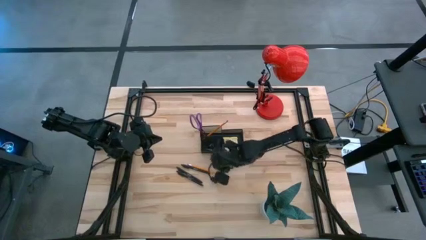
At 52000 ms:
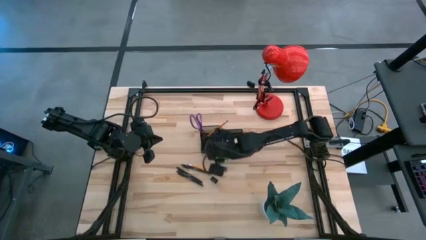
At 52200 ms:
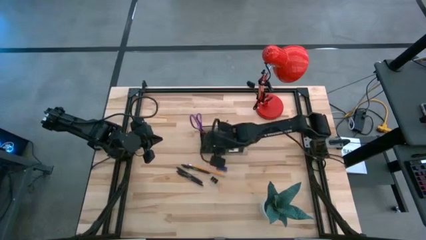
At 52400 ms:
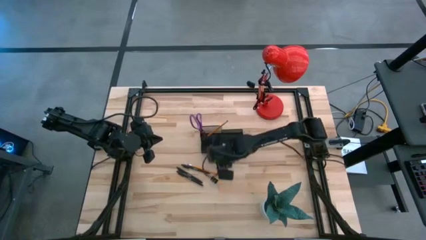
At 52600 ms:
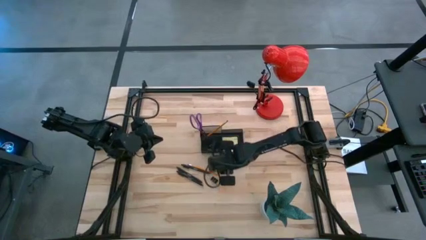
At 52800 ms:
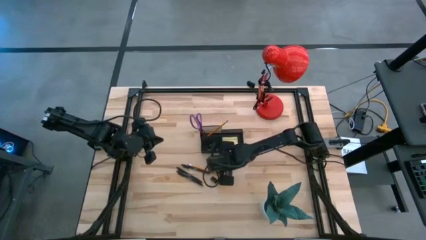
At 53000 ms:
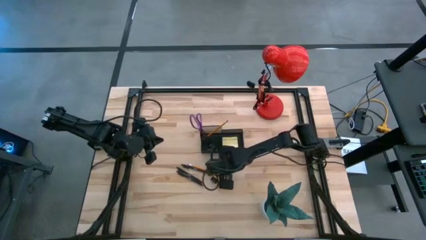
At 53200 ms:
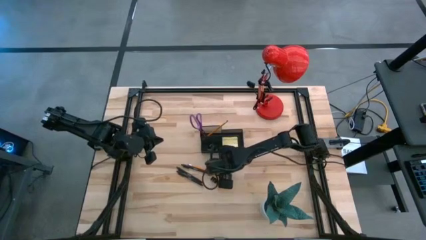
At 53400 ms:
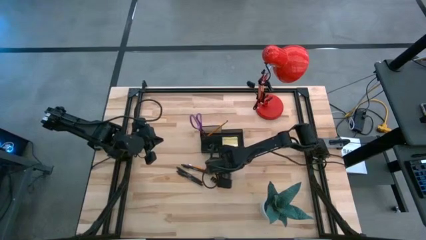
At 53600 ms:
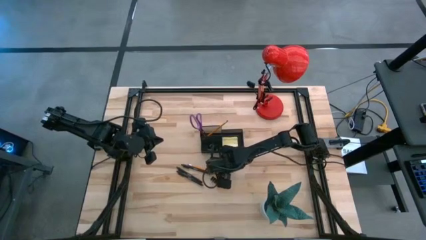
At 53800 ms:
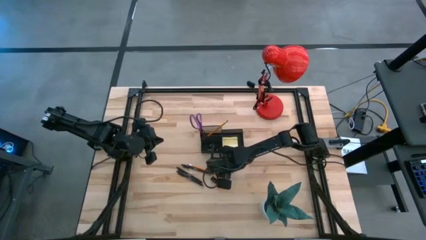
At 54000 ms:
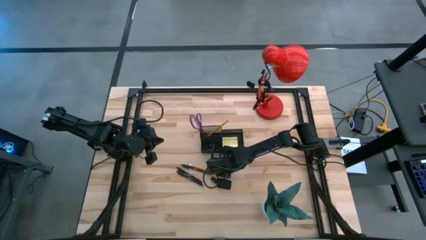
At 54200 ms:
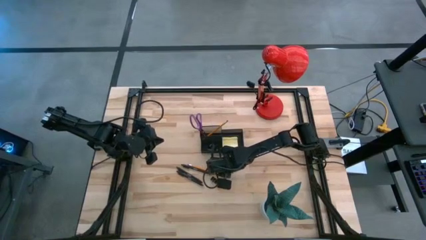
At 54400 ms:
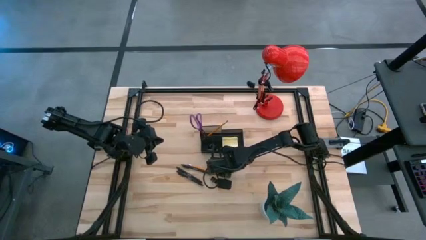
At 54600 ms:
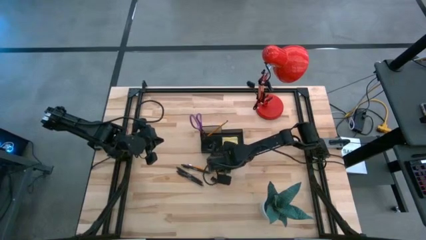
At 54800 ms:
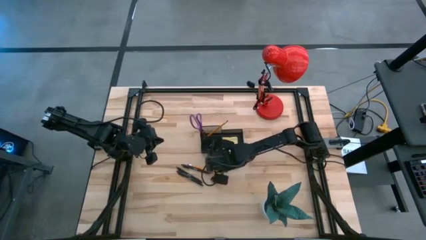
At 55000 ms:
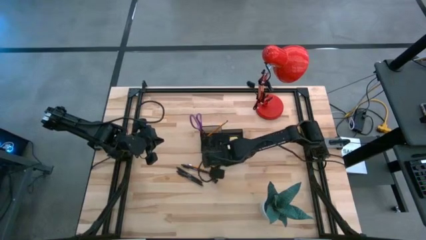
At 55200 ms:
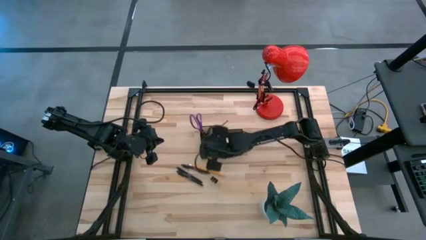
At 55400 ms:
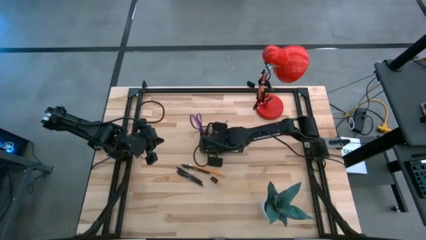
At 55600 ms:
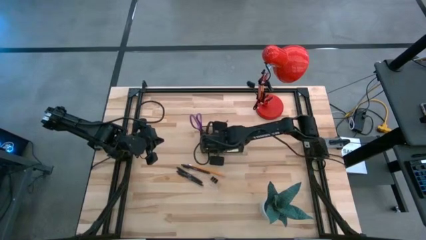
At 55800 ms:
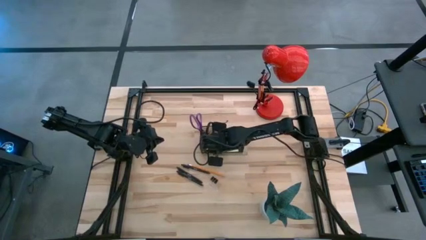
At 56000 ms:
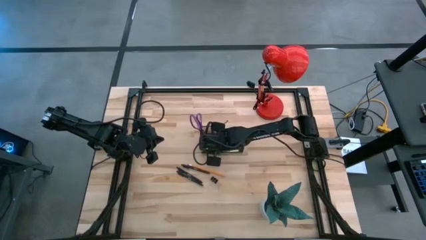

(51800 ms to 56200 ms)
Task: Pick and place office supplies into organizer
Put the blue eraser into the black desk organizer

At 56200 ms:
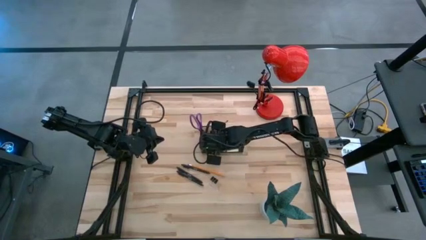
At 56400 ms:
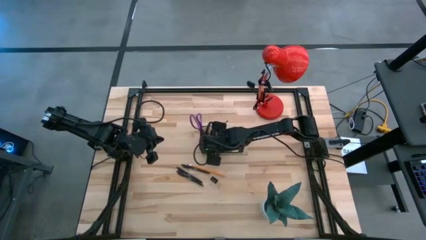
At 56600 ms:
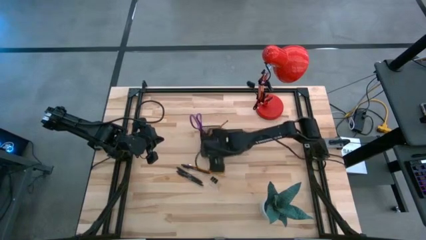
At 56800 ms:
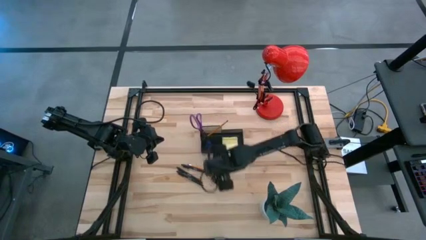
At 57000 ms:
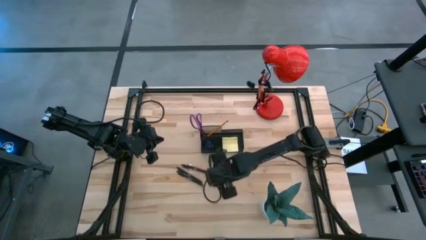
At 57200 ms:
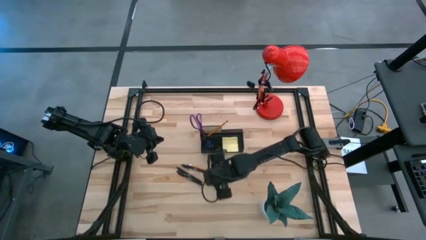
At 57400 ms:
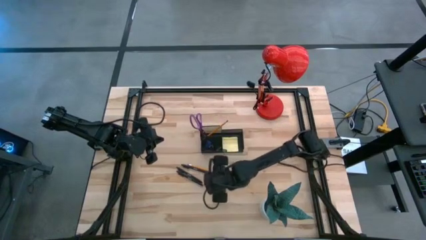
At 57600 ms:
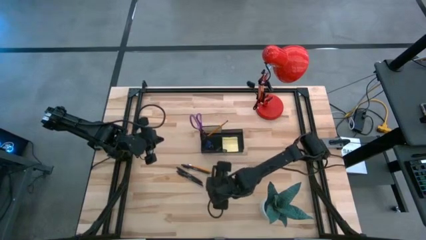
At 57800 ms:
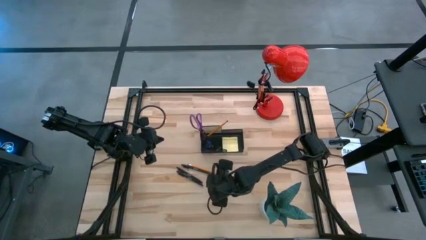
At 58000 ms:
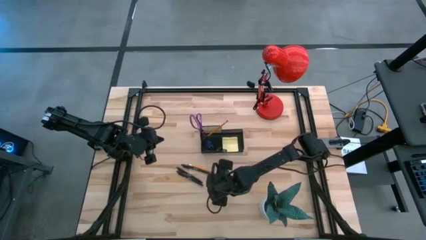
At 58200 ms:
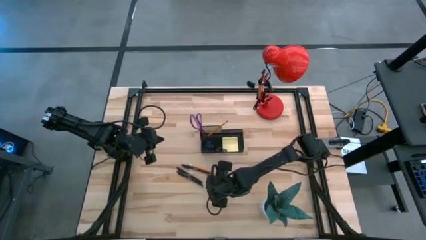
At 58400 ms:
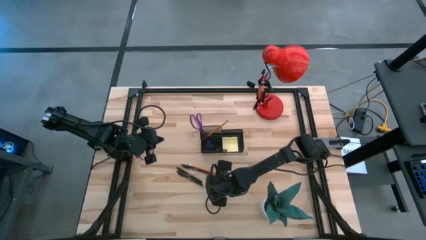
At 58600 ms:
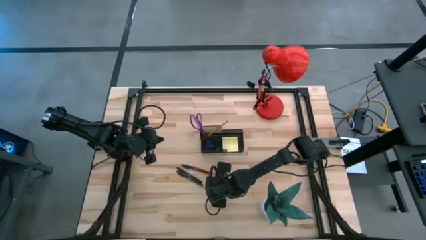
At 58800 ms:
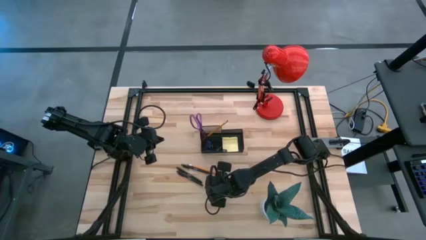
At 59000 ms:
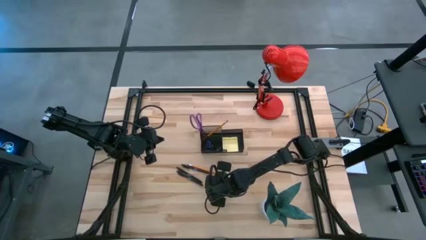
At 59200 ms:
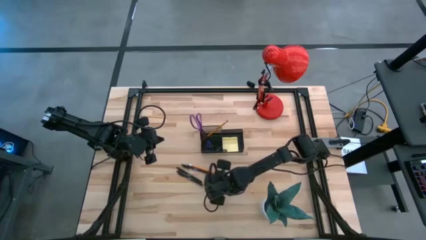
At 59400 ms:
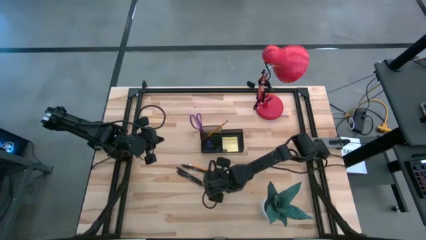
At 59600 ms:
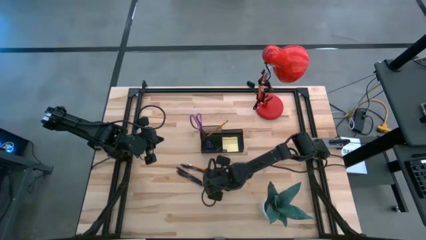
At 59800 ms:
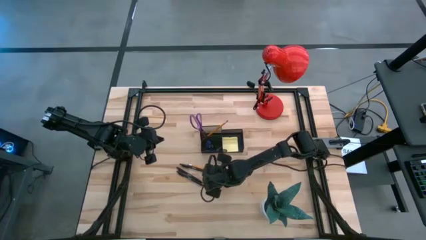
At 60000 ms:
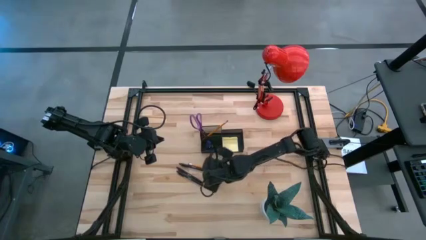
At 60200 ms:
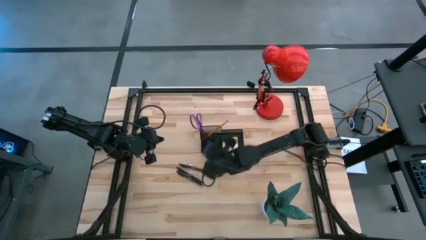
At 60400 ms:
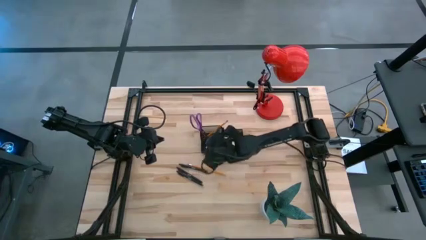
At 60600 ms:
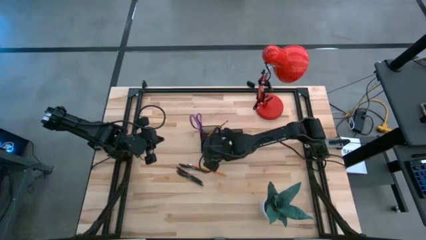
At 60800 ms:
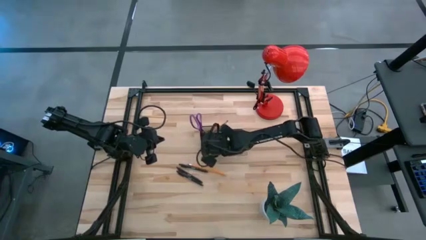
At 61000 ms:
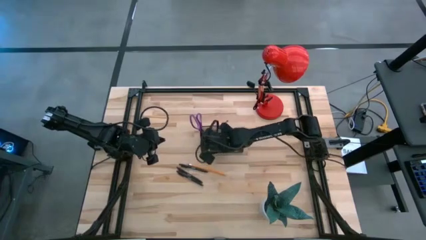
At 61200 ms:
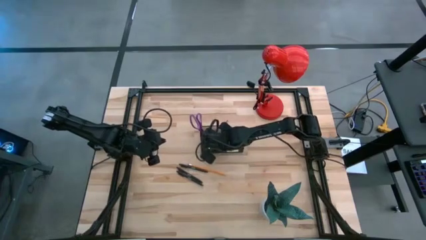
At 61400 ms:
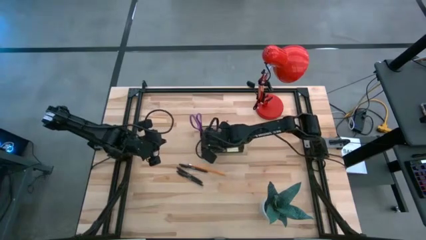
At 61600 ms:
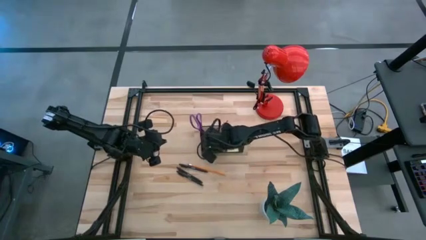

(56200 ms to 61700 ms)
Put the black binder clip into the black desk organizer

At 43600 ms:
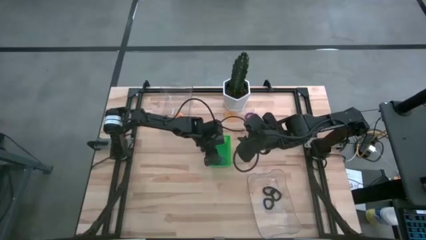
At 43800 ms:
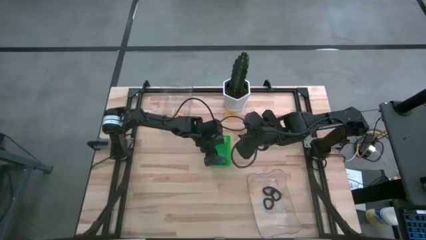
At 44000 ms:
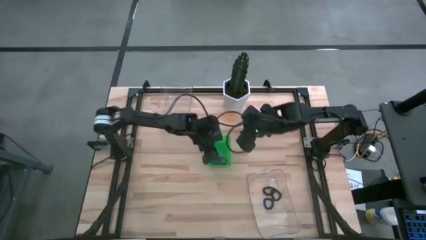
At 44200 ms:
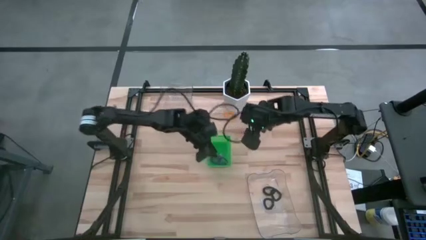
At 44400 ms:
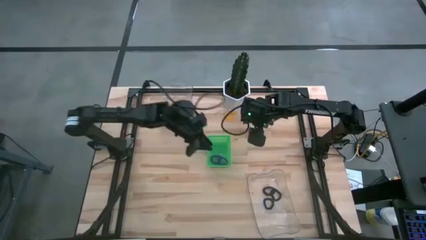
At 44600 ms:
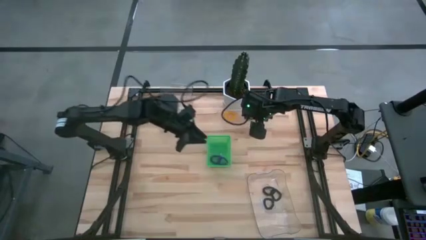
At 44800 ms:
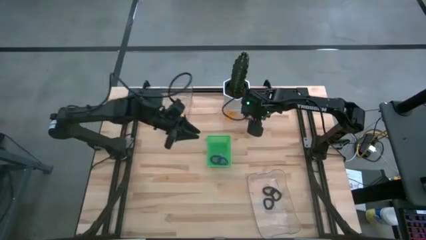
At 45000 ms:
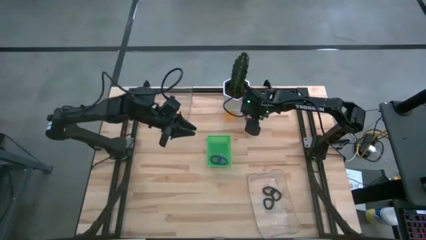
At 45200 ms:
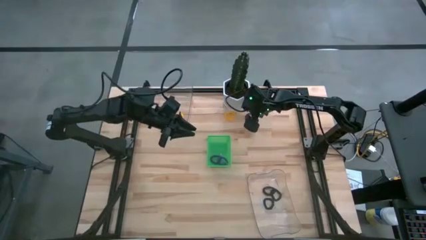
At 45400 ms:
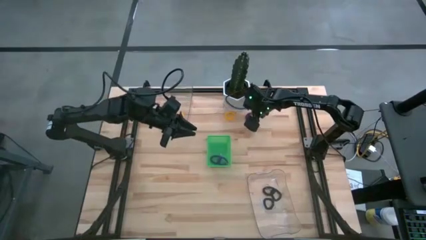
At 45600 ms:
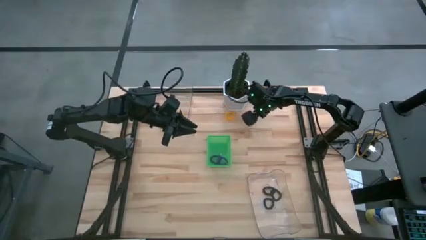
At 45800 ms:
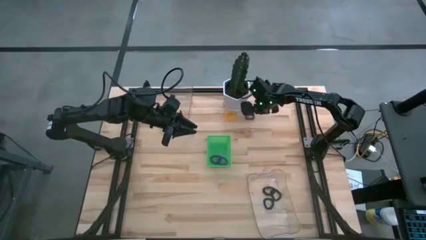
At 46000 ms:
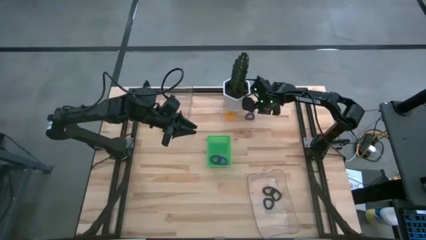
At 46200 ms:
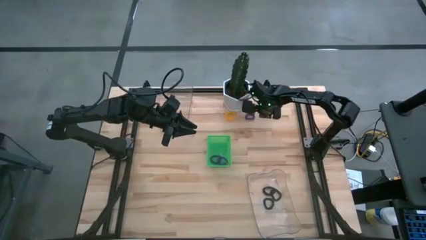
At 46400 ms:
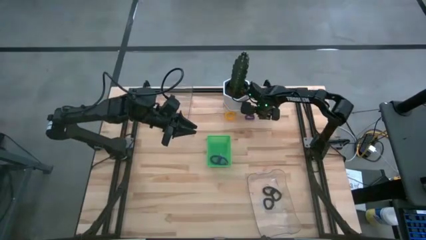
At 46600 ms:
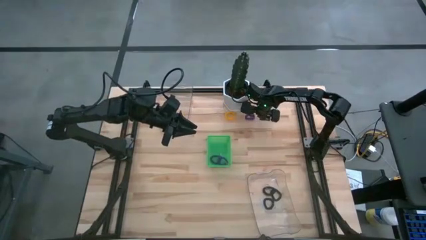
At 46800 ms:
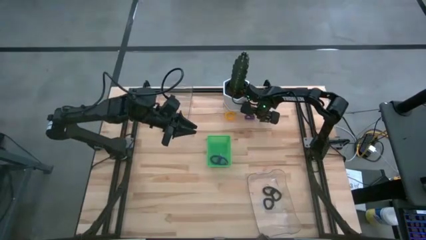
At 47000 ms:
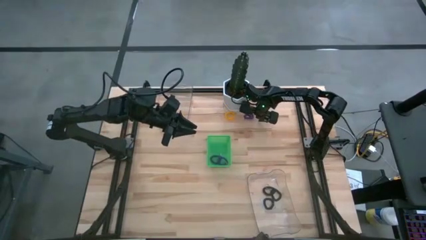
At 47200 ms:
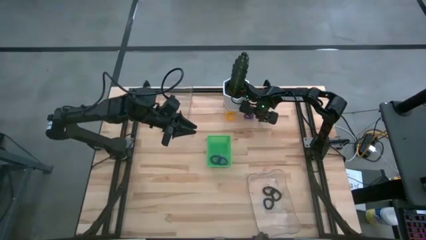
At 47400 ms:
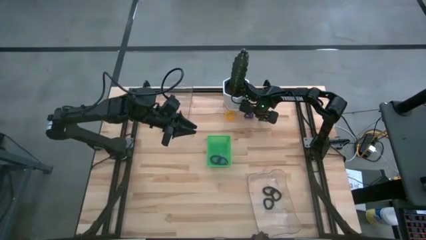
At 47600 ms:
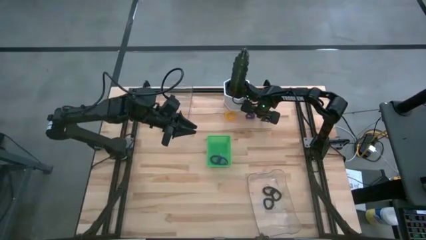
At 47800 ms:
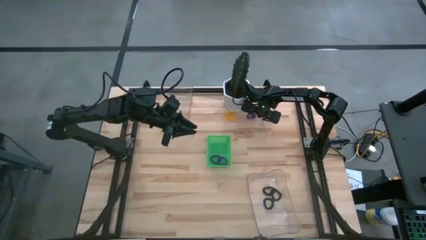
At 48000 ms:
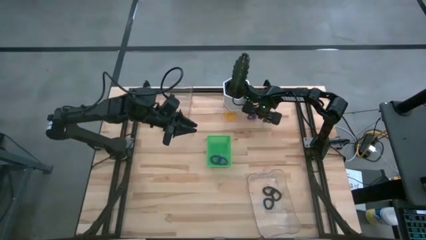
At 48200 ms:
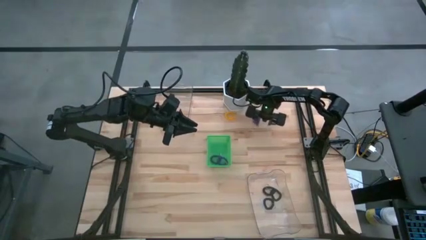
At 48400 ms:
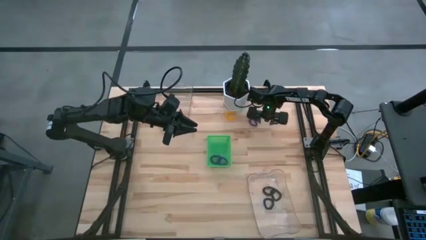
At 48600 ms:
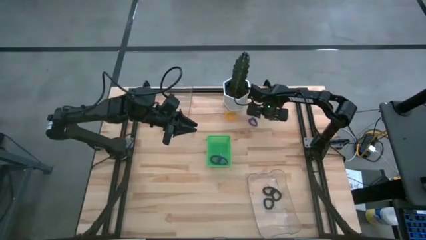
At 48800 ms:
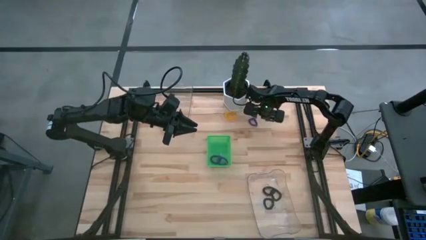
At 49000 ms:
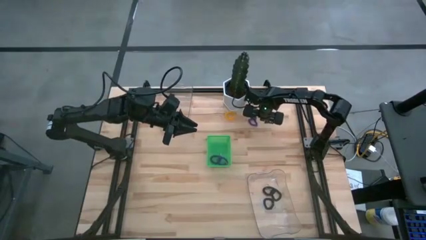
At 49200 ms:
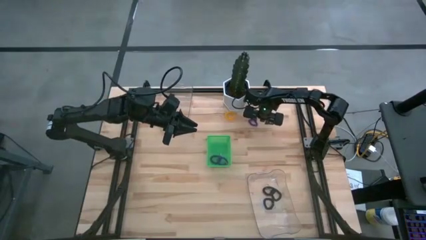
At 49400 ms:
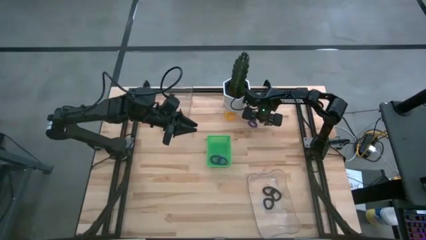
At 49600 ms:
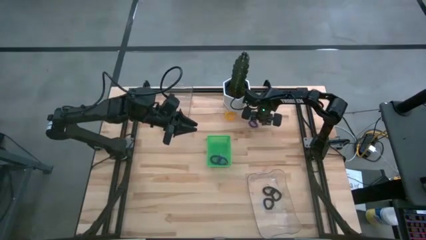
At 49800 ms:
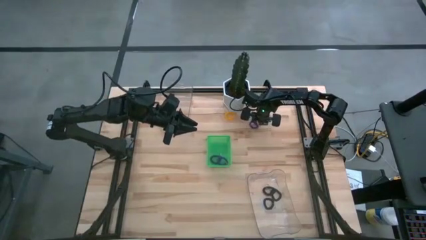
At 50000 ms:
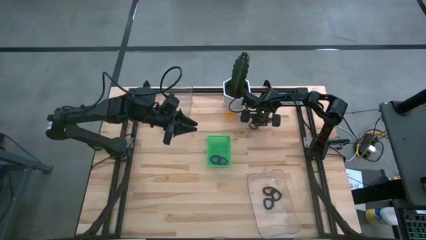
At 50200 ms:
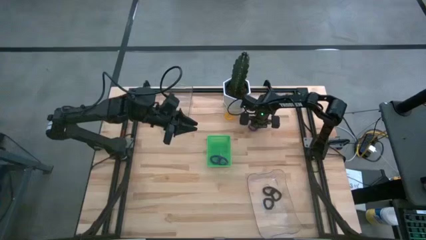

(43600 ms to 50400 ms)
Task: Sort spring keychains
Put the purple spring keychain into the green bin

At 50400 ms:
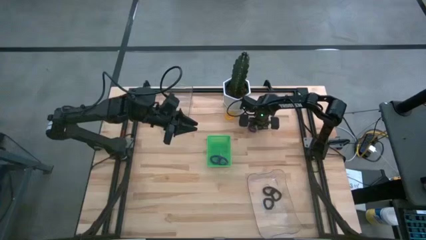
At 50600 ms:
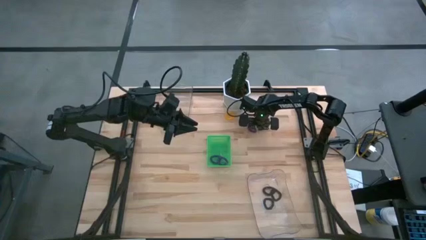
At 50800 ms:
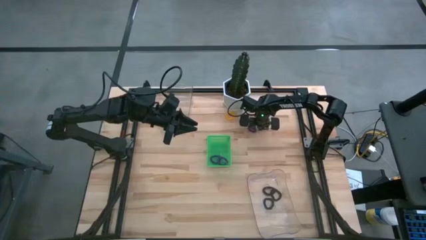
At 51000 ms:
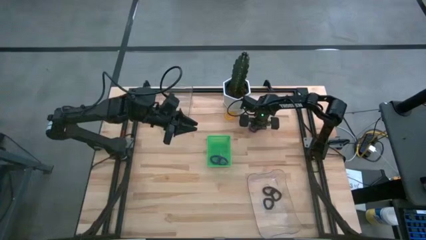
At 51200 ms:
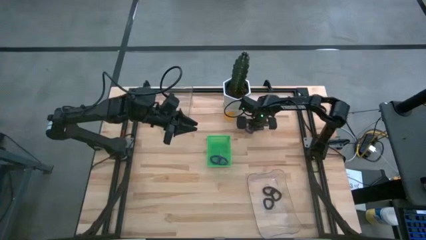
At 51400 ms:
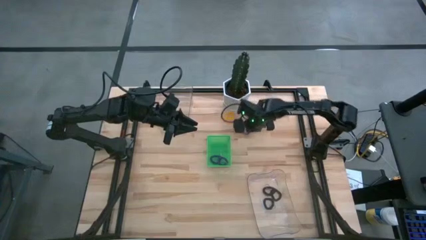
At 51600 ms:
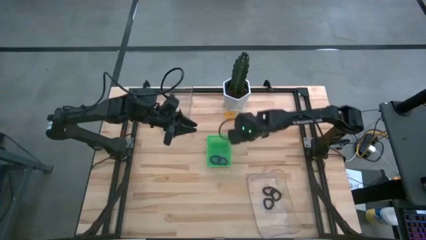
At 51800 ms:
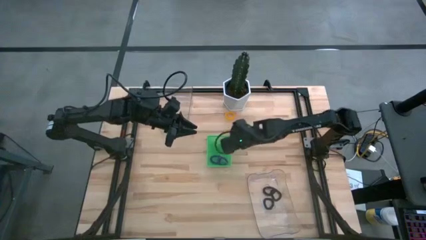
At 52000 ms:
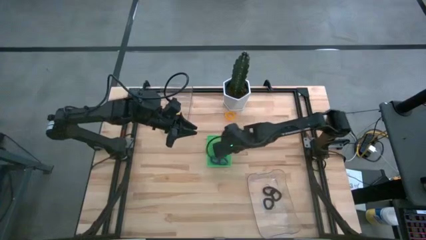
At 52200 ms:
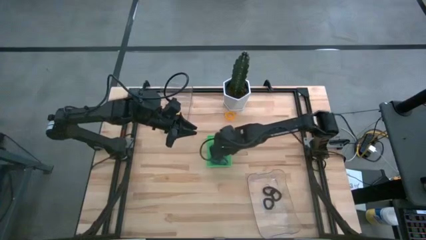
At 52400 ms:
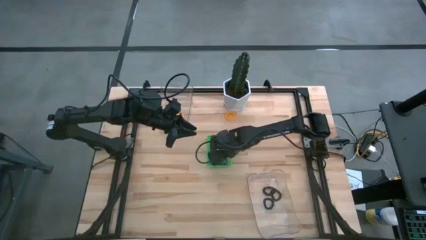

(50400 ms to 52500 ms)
Put the purple spring keychain into the green bin
